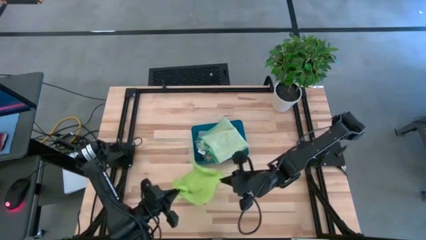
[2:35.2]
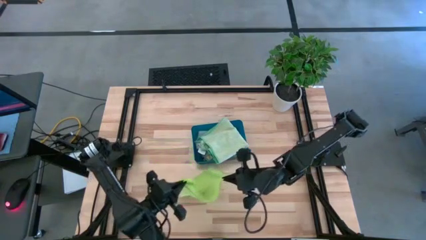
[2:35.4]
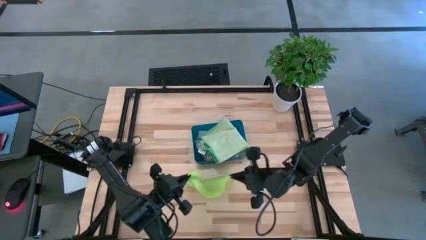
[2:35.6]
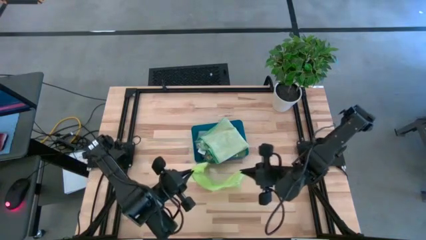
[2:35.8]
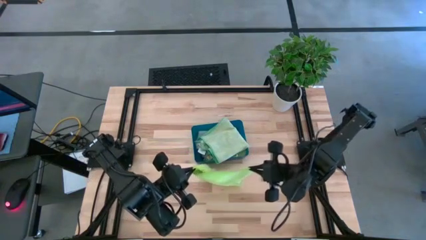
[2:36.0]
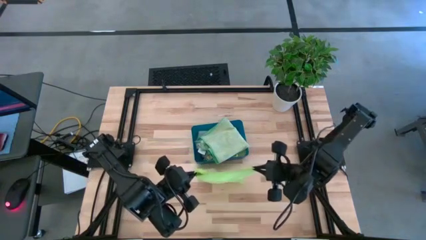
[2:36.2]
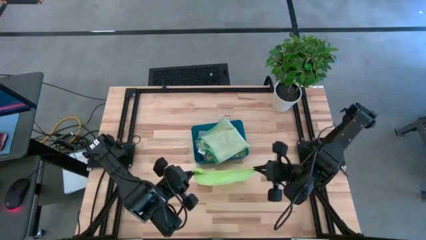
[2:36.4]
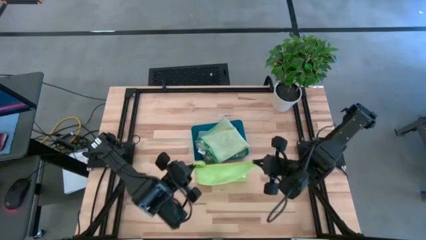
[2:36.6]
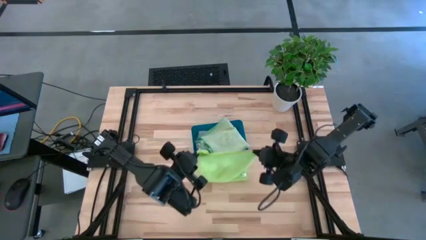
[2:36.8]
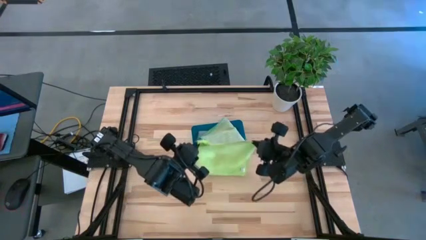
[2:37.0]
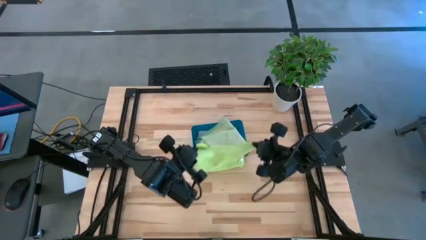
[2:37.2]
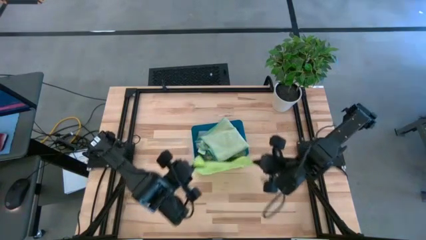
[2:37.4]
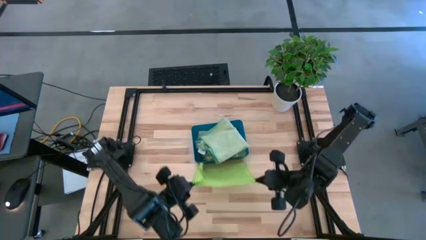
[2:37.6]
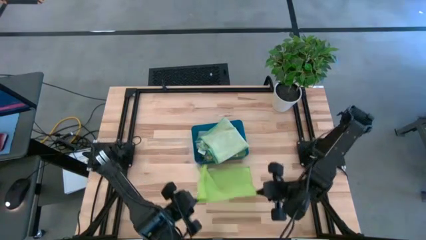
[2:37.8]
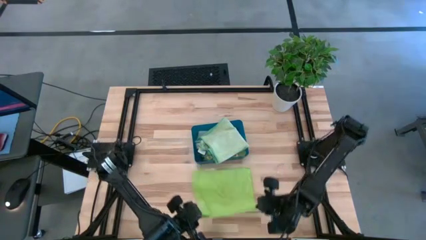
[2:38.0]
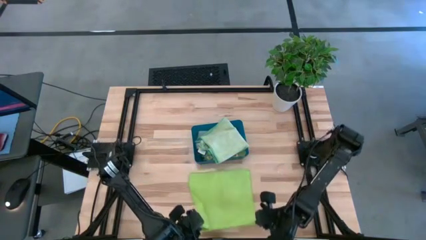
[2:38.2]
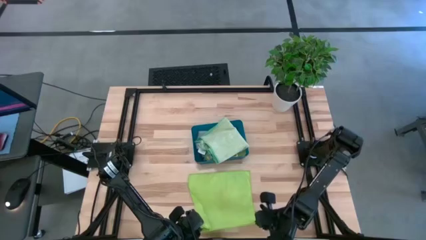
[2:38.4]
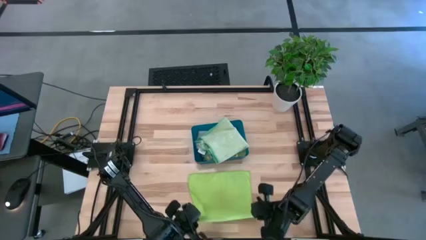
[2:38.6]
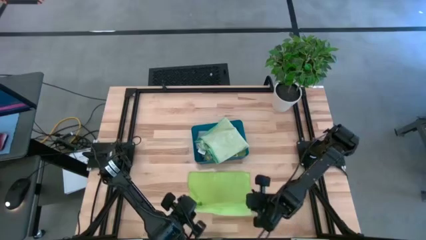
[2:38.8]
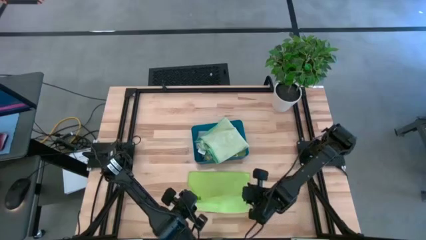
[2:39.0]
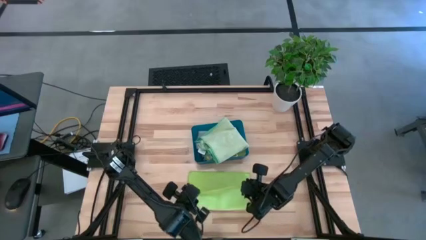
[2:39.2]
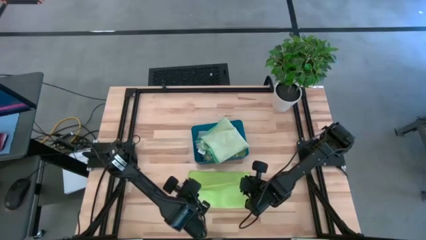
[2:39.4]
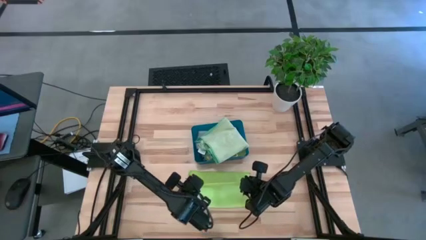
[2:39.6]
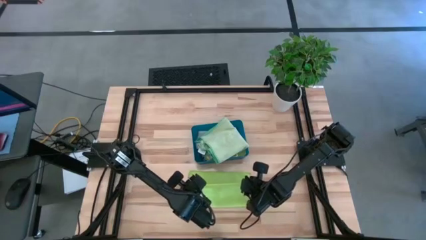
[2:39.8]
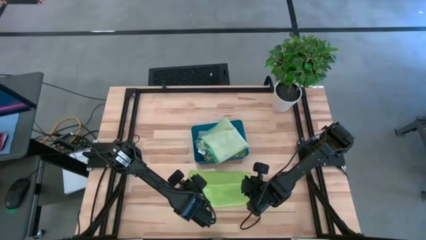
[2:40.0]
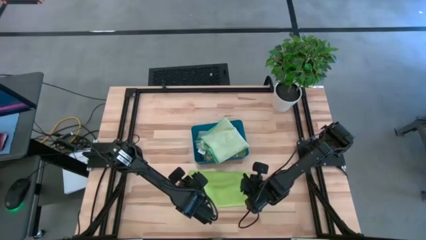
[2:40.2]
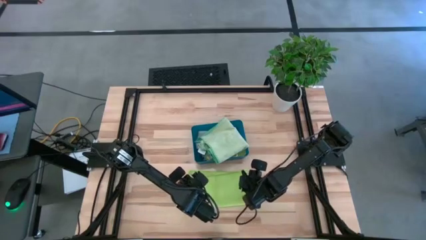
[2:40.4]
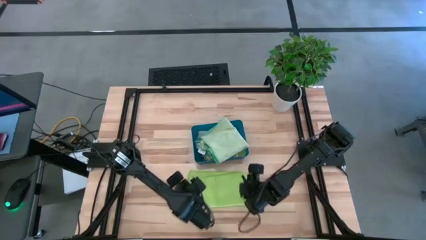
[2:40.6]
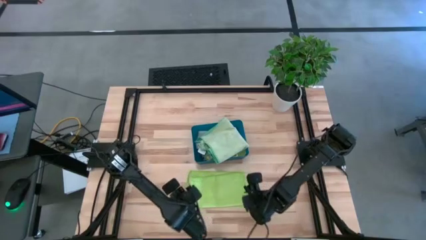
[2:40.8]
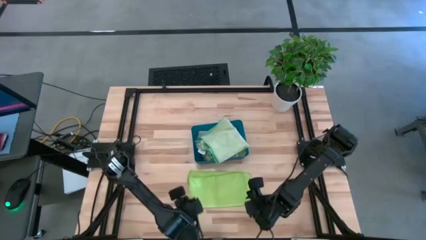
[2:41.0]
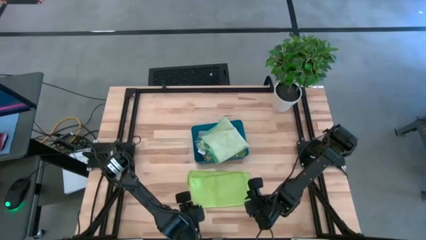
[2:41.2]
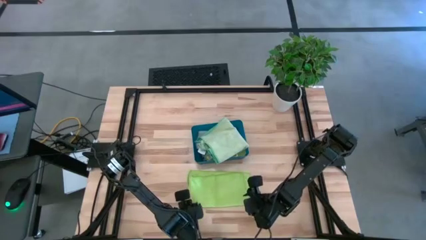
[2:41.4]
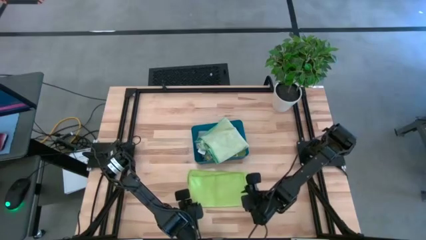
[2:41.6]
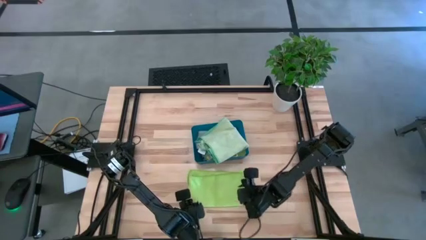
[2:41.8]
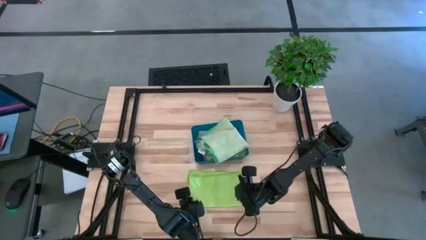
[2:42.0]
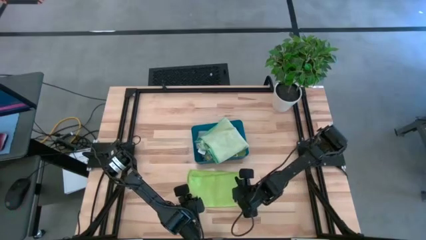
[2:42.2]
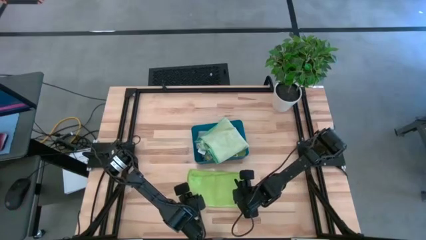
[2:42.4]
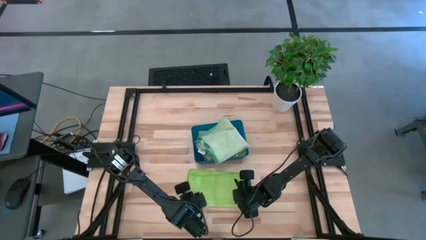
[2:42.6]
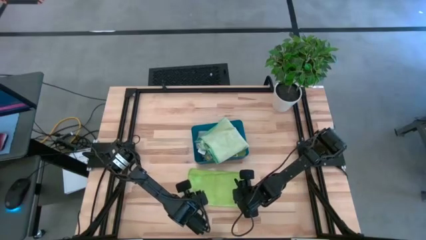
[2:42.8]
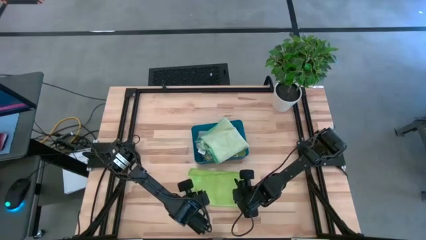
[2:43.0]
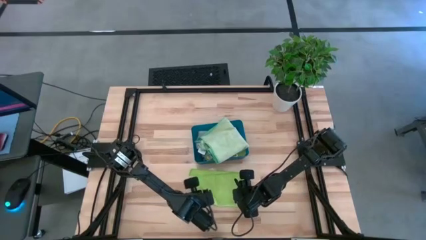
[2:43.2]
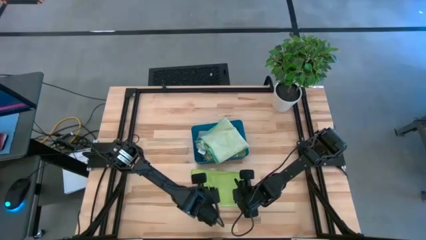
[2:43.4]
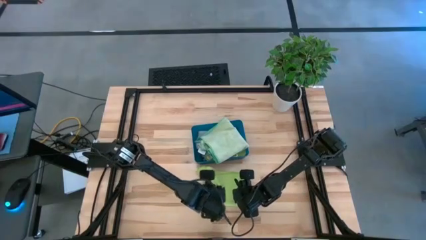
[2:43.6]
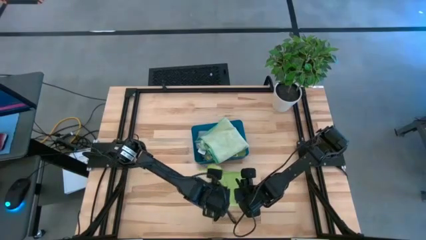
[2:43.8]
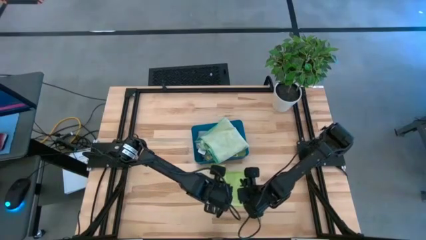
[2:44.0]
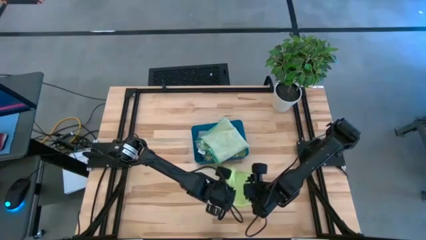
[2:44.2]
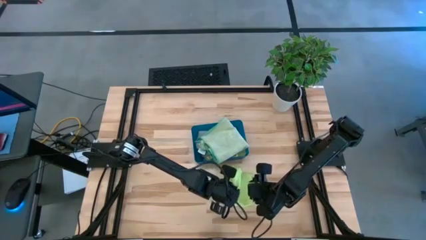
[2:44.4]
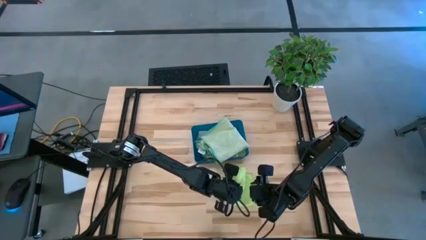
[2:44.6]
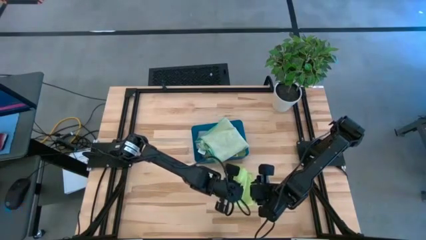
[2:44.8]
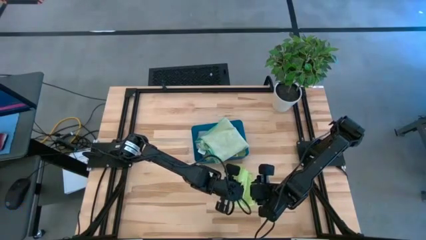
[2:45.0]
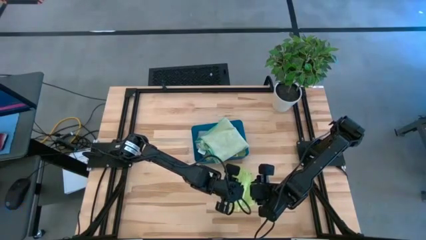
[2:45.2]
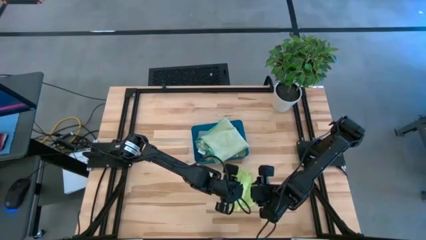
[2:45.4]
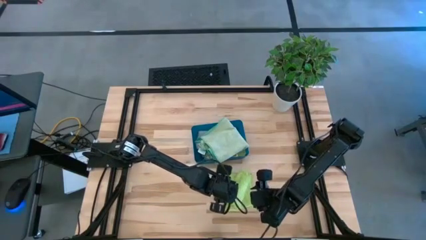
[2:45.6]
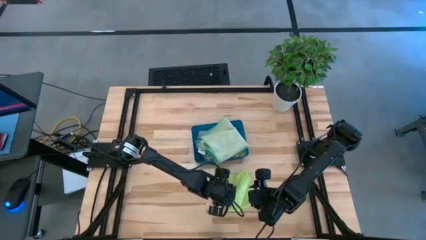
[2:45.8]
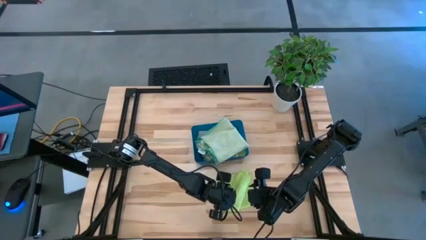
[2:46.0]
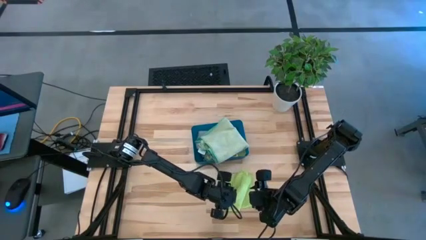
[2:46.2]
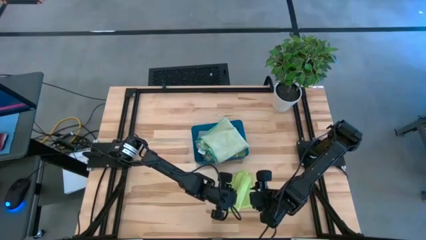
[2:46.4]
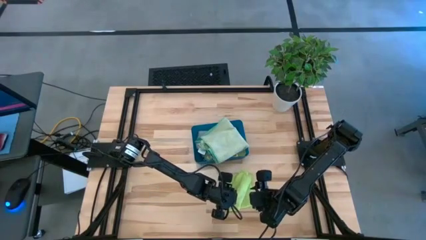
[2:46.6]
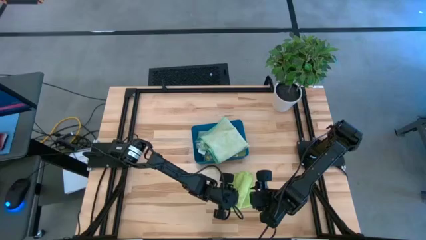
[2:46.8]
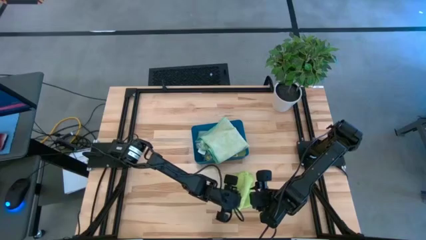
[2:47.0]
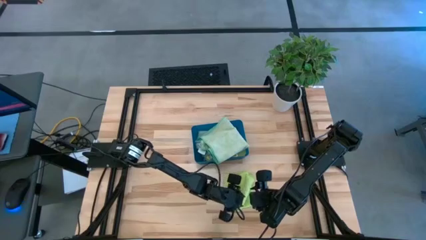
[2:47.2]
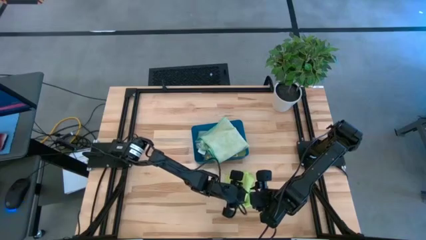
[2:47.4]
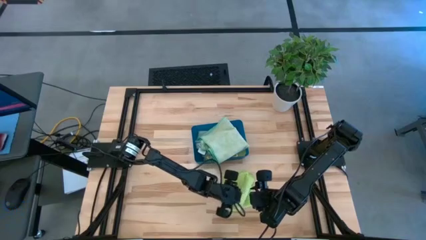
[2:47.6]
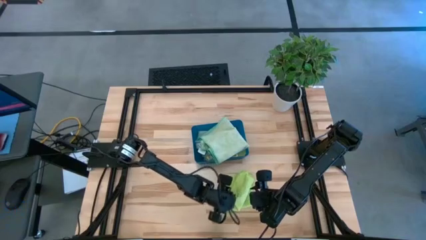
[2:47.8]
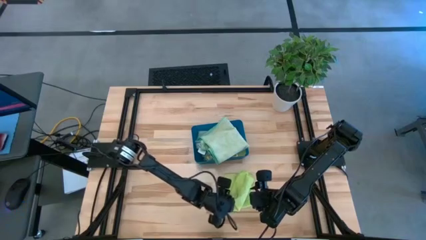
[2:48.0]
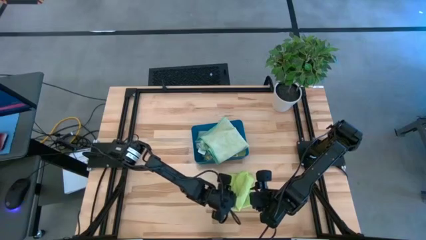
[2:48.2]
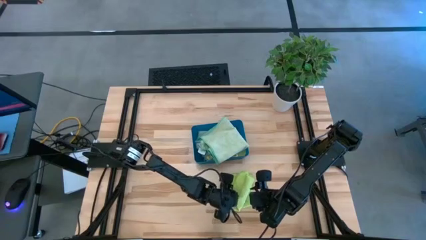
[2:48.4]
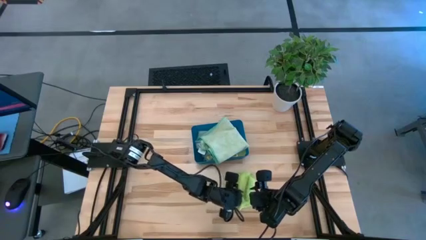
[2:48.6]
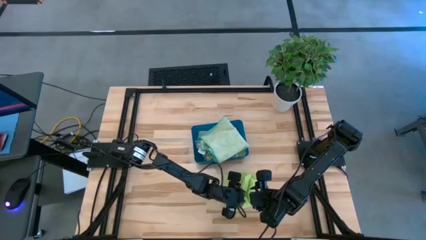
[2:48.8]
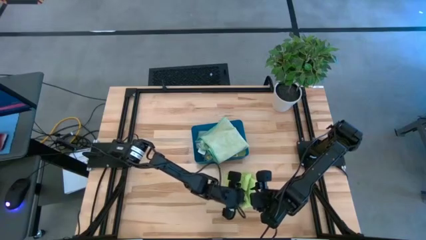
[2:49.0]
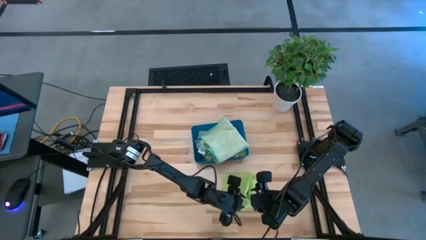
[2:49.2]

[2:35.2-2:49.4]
Task: Fold microfiber towels
Fold the green microfiber towel

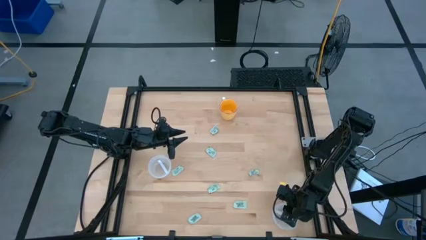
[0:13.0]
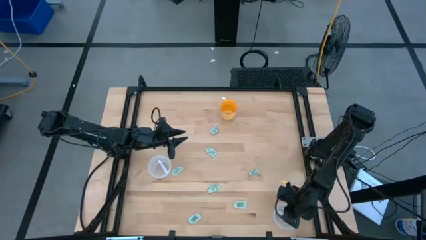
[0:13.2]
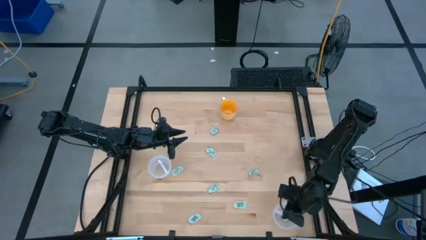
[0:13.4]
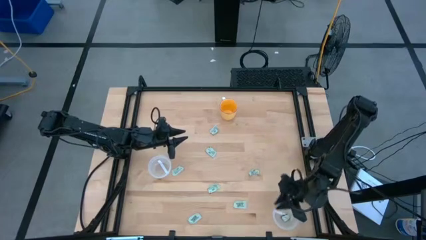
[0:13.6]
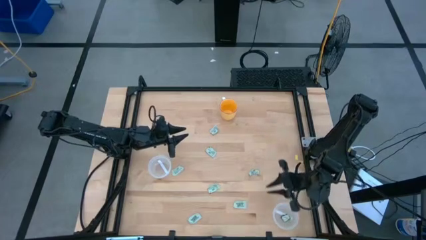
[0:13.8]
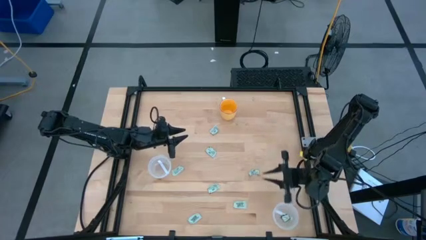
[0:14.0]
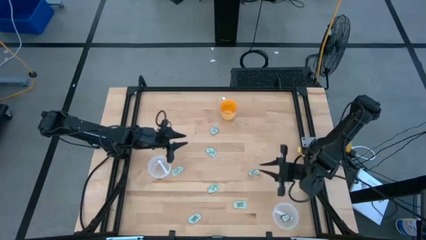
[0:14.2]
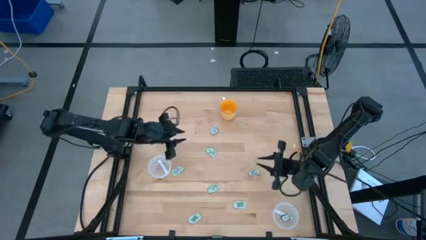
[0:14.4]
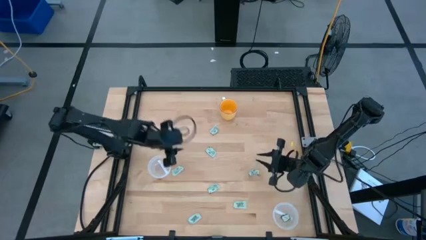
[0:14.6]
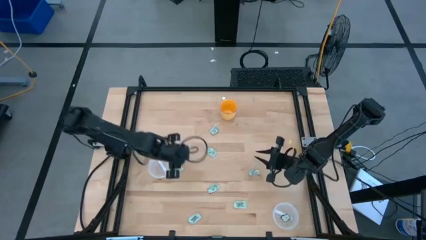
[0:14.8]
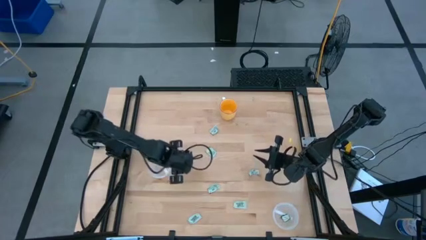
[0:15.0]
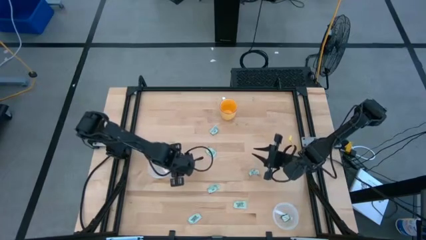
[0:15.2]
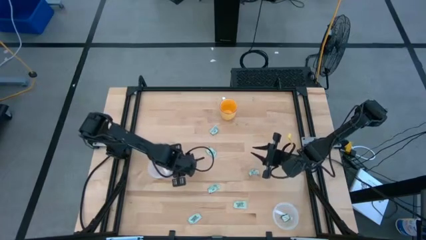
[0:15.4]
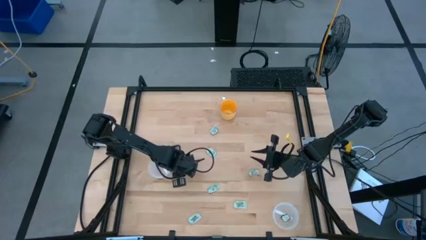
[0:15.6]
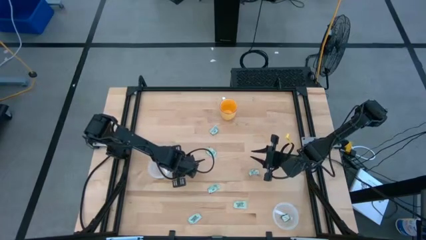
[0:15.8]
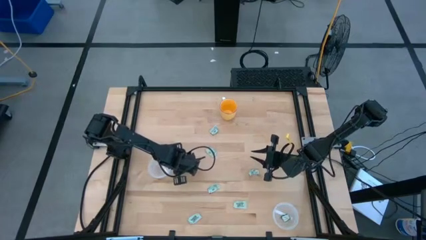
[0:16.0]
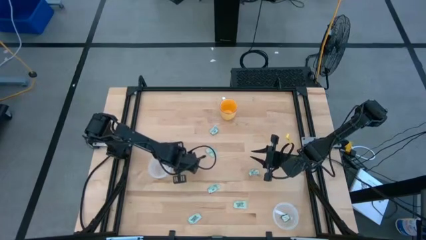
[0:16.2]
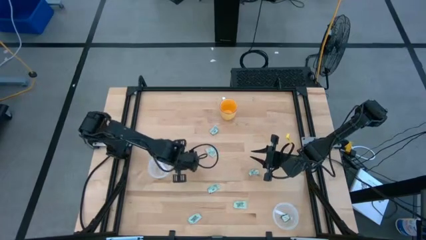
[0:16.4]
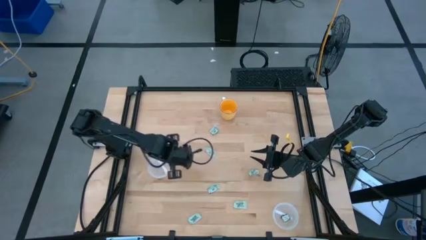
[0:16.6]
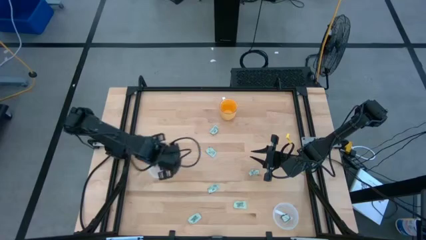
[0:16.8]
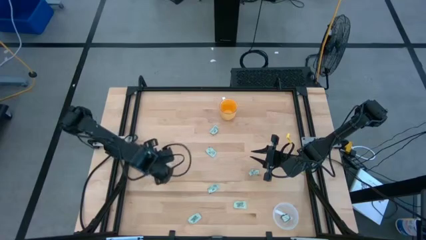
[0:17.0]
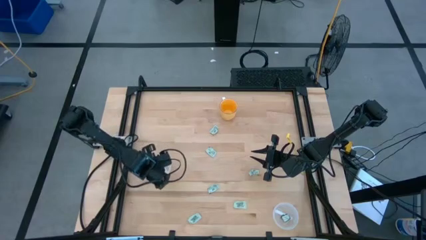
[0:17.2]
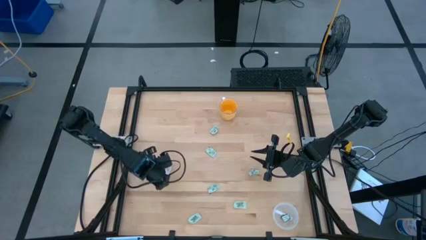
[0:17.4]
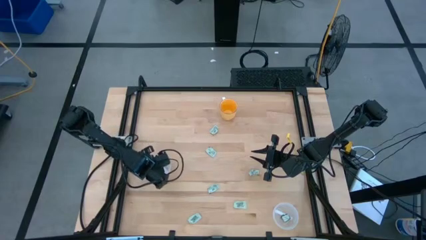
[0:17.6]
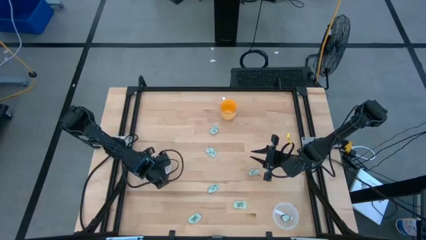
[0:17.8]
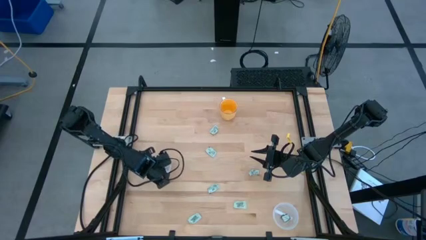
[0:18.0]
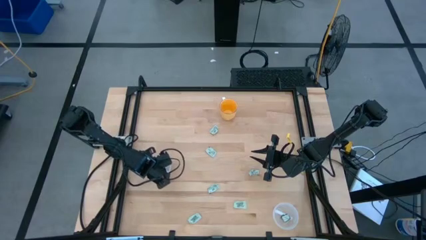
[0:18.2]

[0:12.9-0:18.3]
Task: Pick and place Stevia / Truvia into bins
Put the light green stevia packet into the left transparent container
